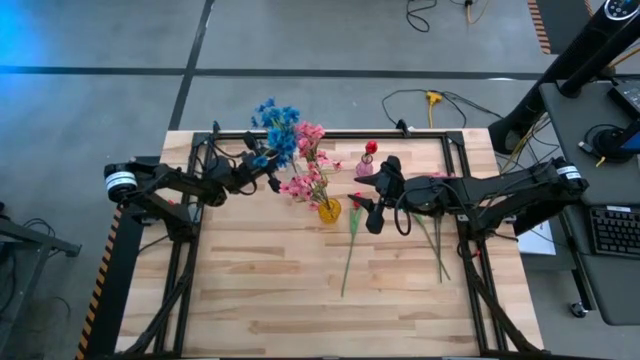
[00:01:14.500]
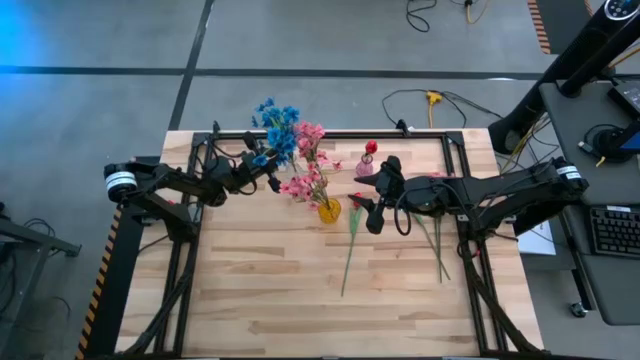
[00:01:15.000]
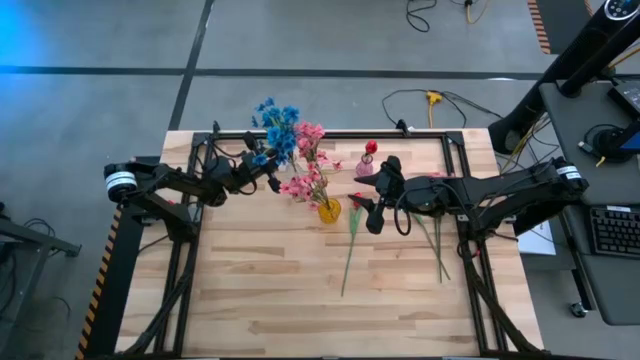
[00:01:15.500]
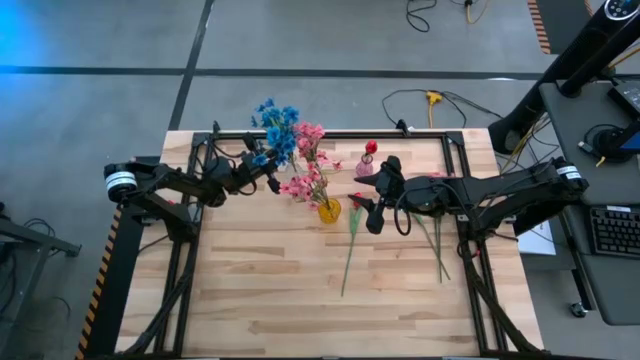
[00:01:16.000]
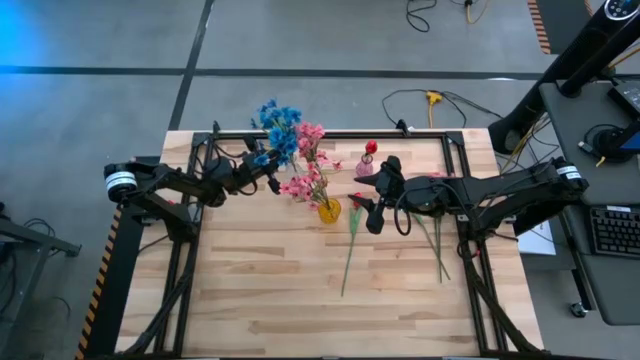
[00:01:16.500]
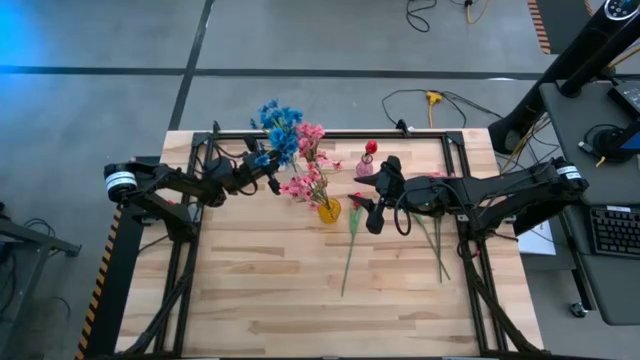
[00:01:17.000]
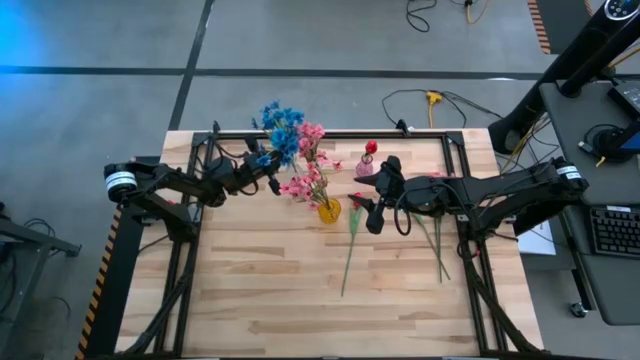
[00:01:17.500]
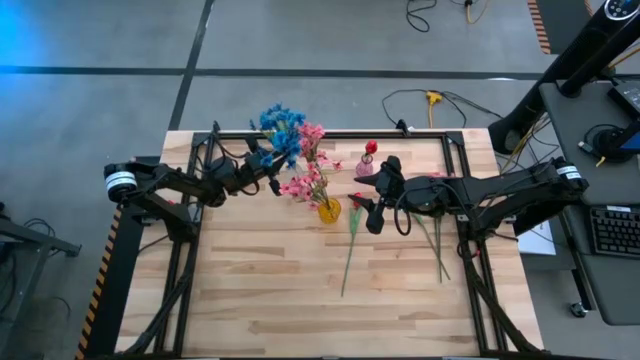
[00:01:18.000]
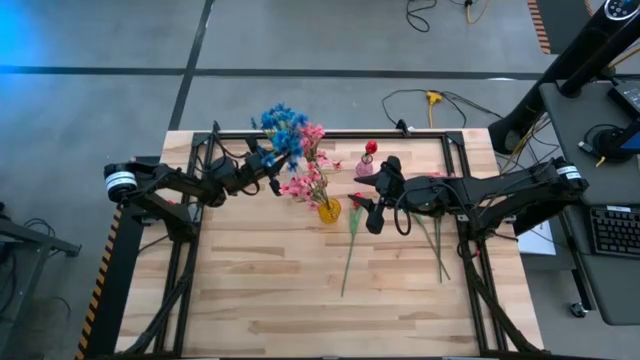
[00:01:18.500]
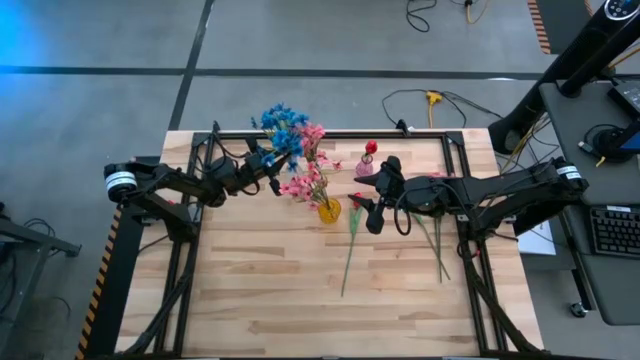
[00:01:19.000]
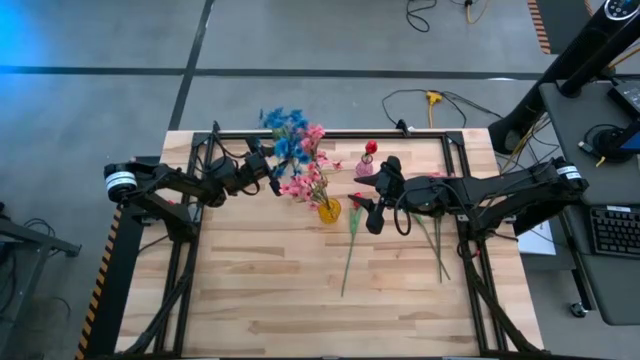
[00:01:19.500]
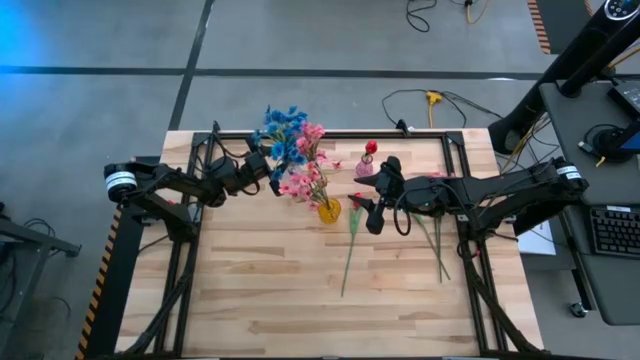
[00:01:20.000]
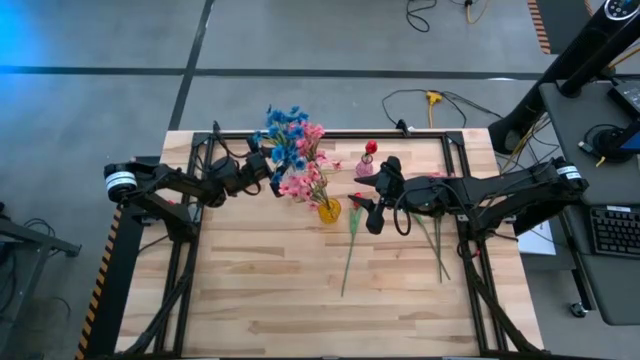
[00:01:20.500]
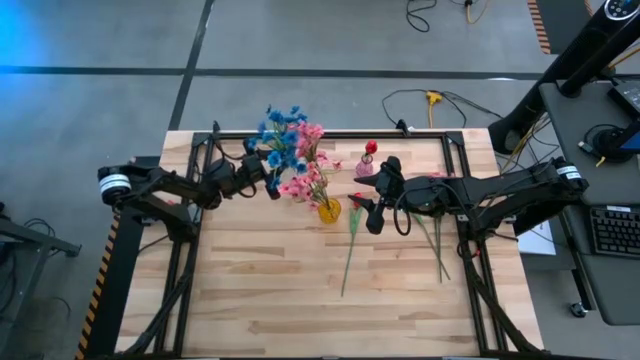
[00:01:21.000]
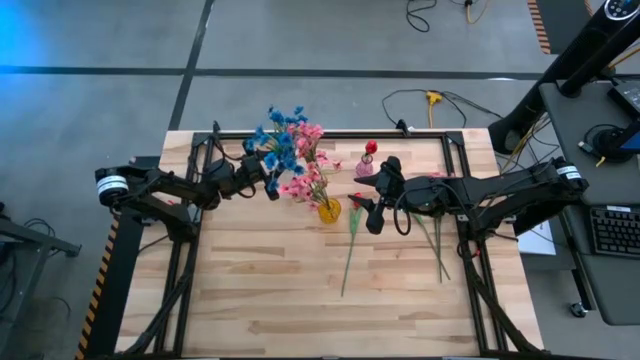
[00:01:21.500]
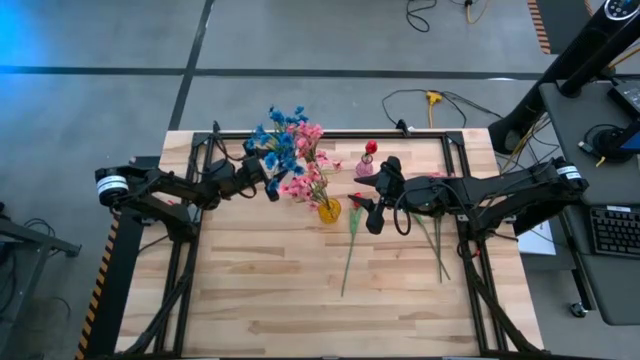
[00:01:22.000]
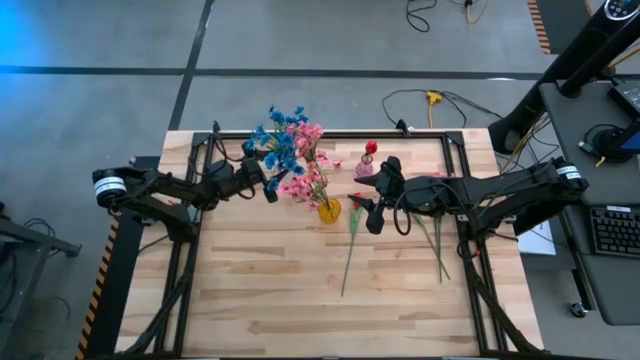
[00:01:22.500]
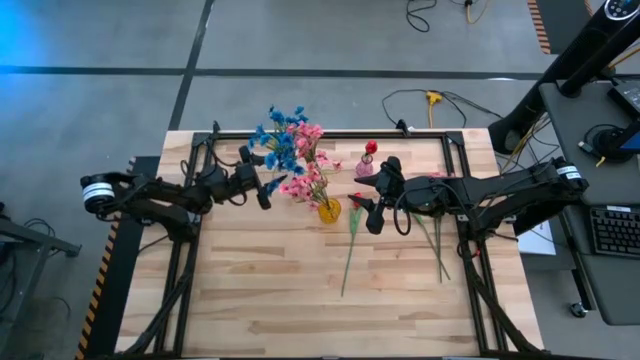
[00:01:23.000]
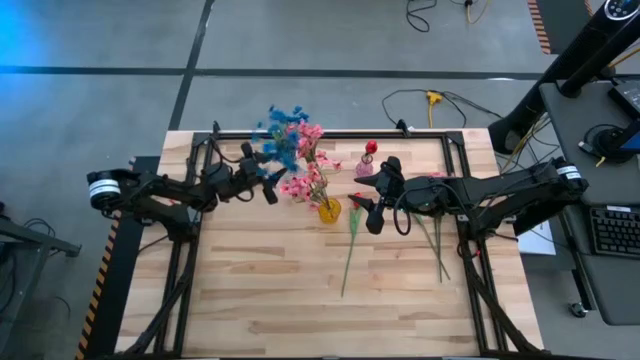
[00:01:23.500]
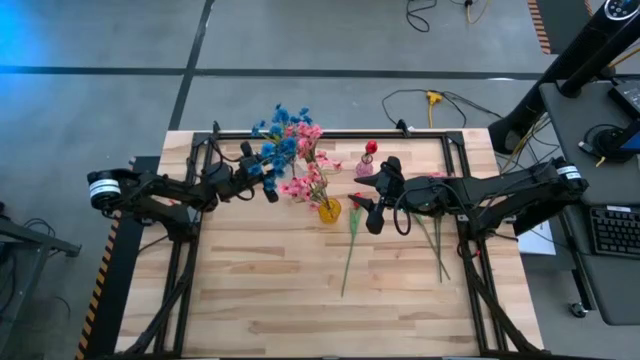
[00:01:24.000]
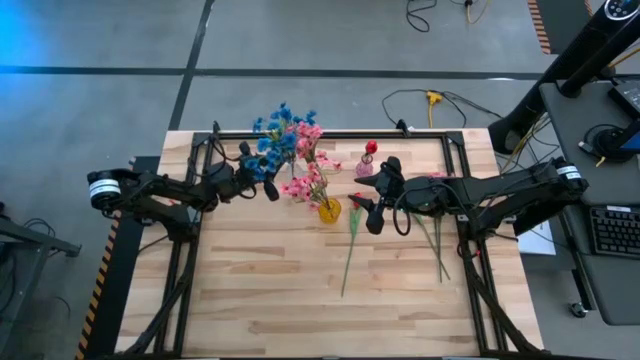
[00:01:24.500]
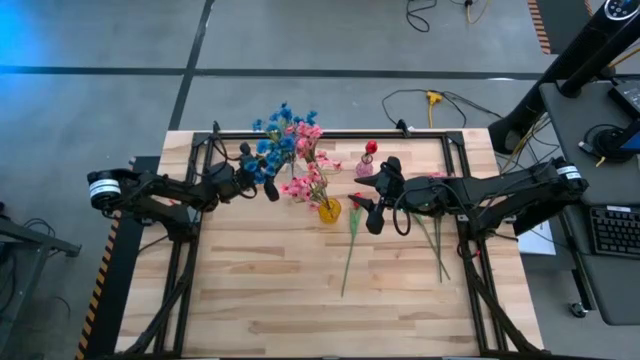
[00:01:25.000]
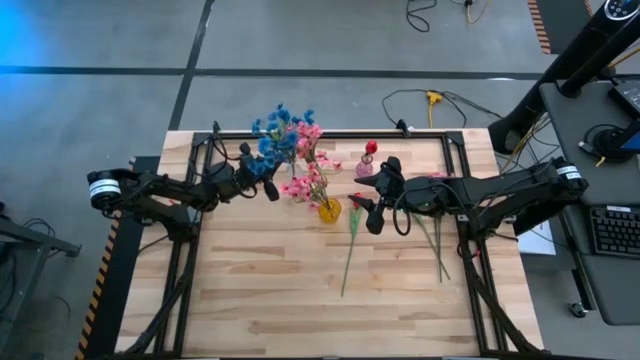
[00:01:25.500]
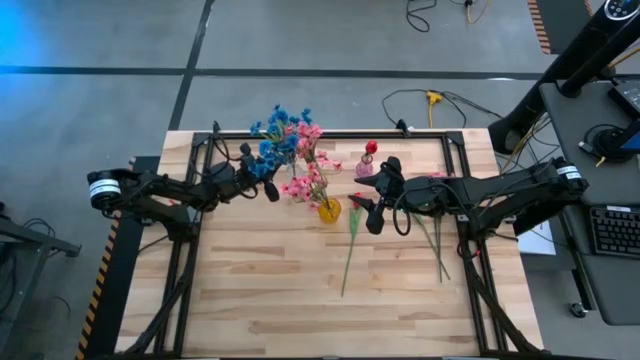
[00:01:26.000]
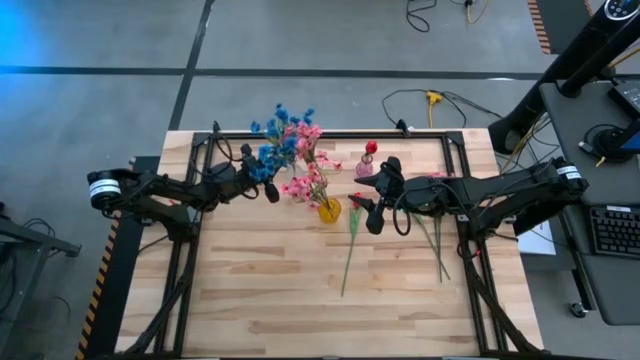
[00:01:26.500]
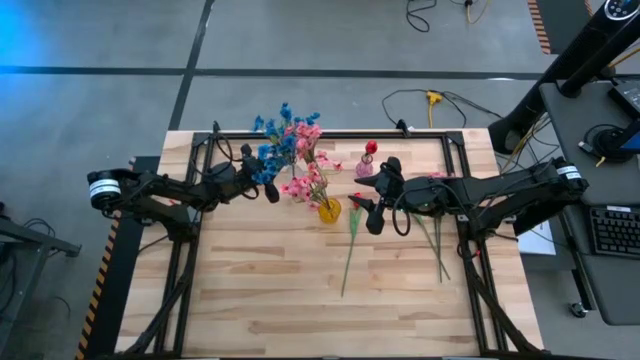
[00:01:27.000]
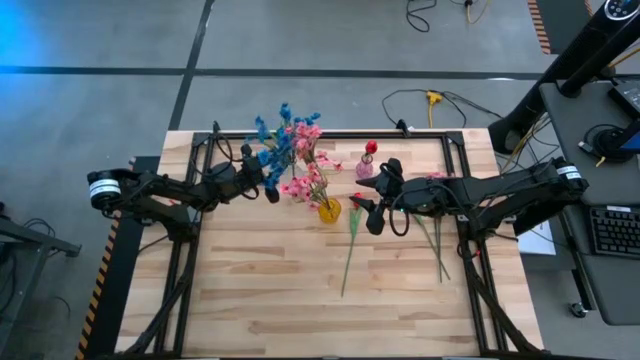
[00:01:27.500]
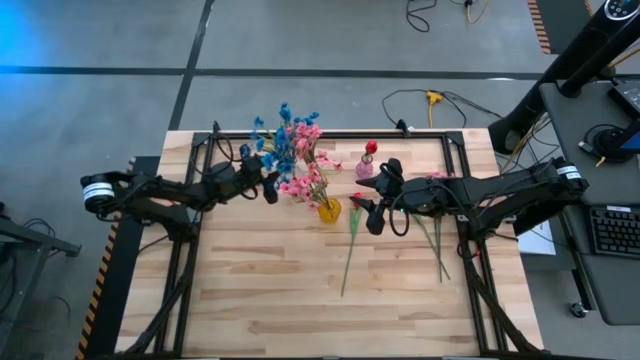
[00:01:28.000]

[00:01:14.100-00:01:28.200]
Task: Sort flowers into vase by color
Put the blue flowers into the transparent vase

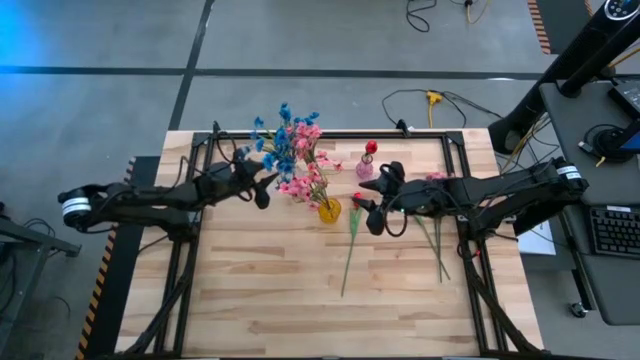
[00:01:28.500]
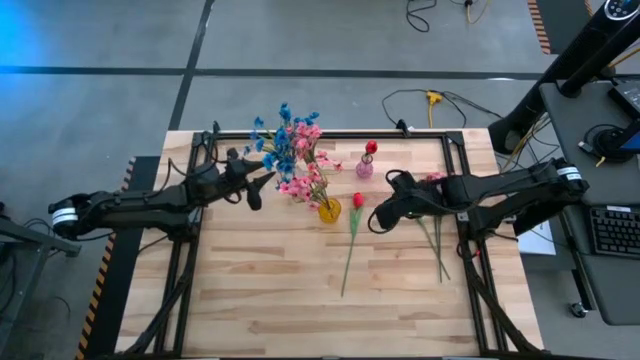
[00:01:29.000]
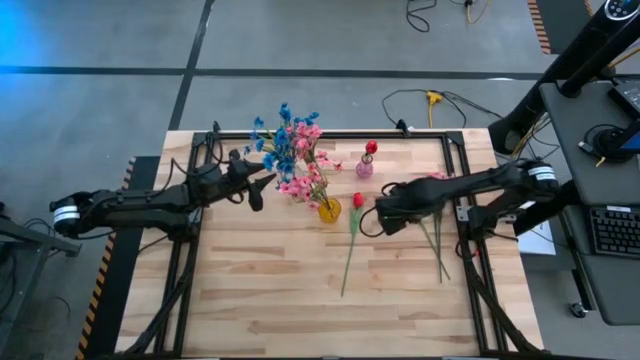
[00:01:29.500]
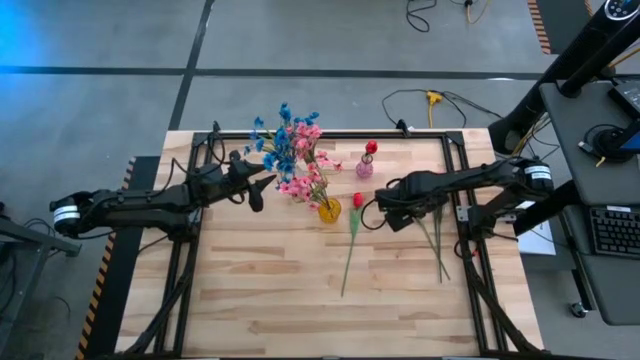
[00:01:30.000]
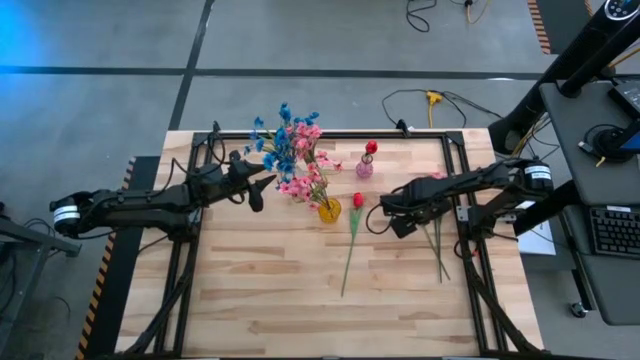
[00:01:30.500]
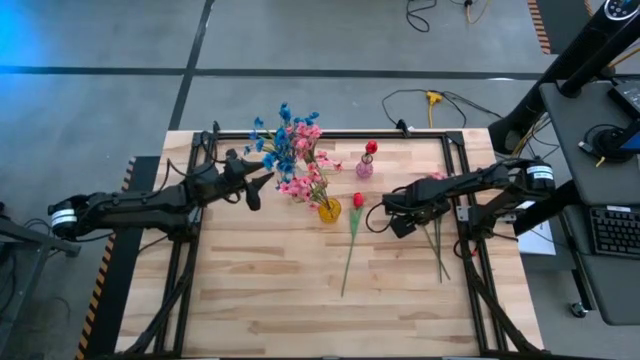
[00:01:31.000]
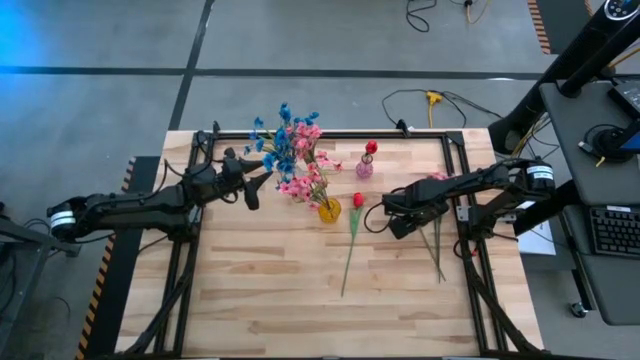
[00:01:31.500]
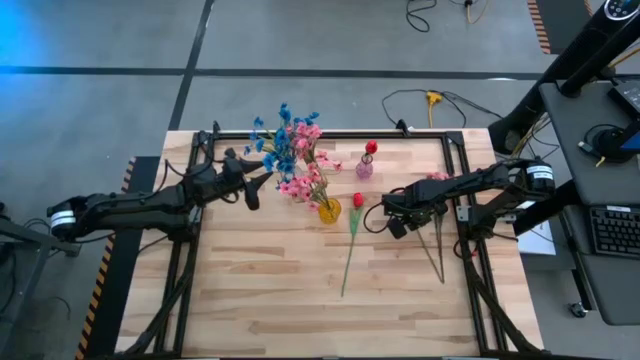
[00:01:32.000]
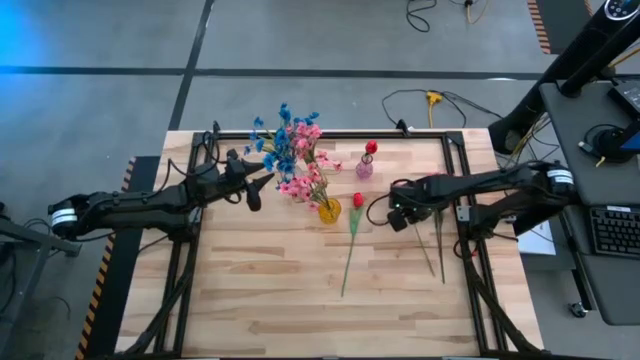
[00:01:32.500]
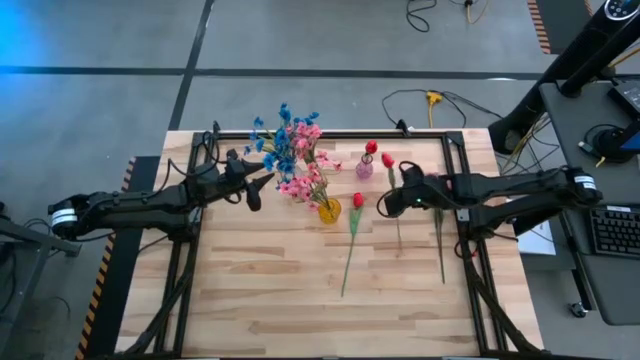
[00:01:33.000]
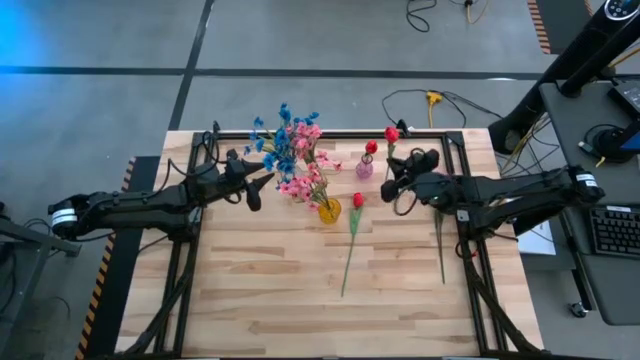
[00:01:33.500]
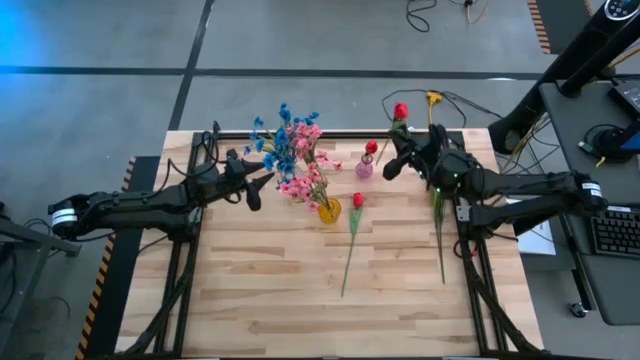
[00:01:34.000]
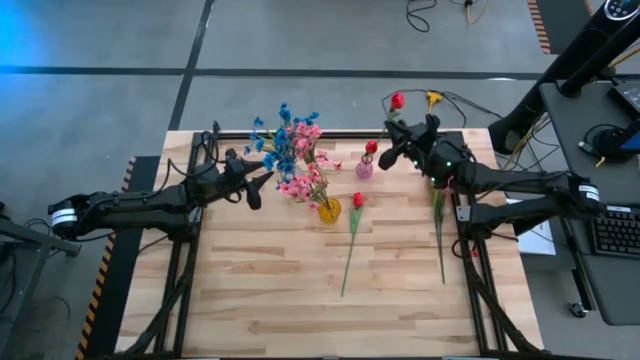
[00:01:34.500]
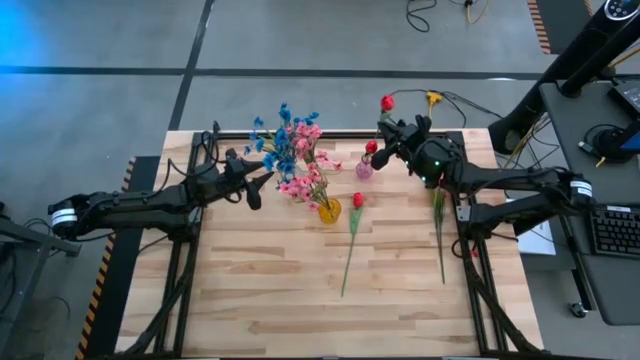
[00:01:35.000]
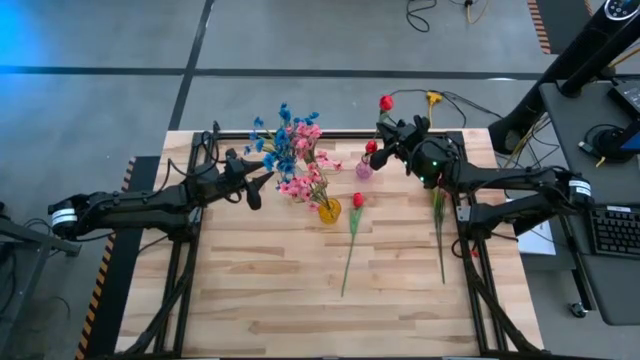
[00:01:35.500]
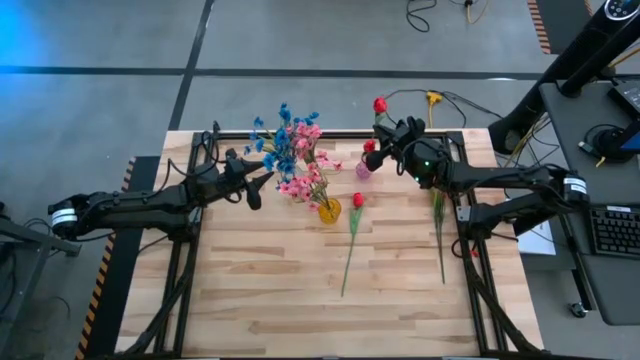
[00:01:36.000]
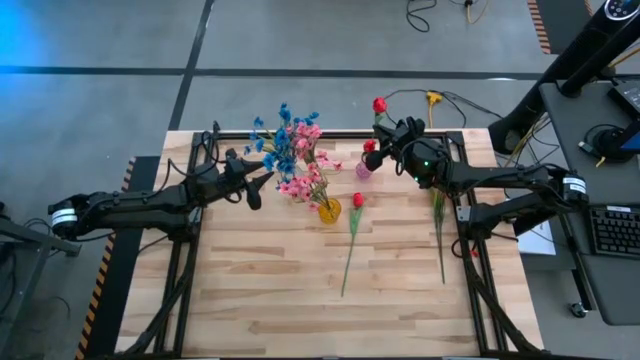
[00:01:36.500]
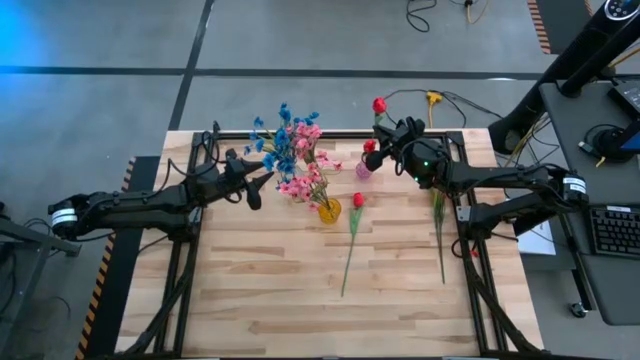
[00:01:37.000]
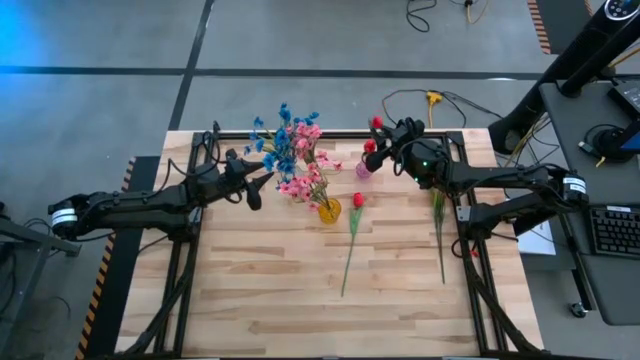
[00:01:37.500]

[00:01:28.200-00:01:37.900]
Put the right red tulip into violet vase
